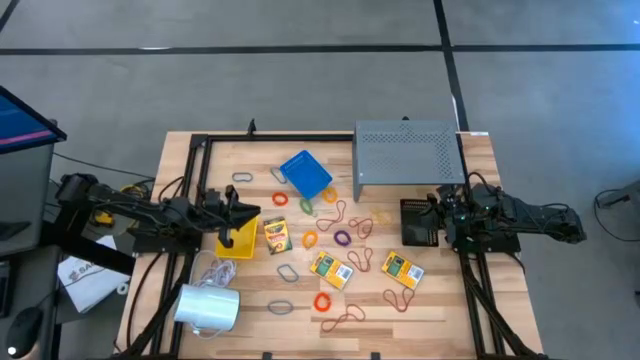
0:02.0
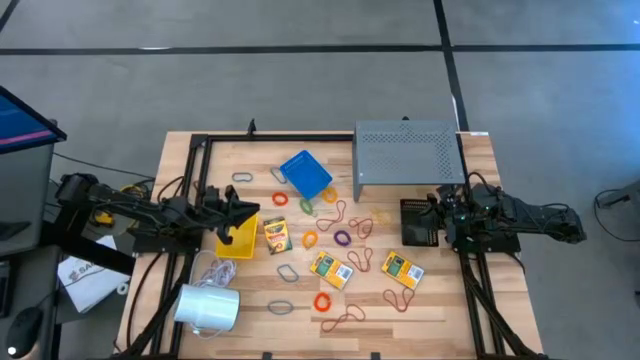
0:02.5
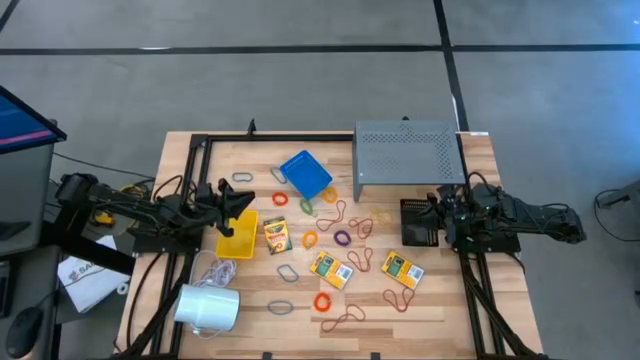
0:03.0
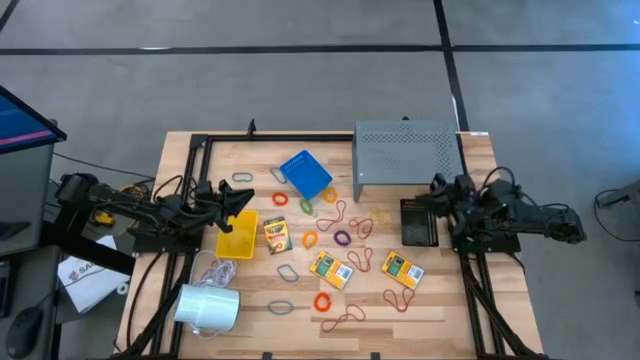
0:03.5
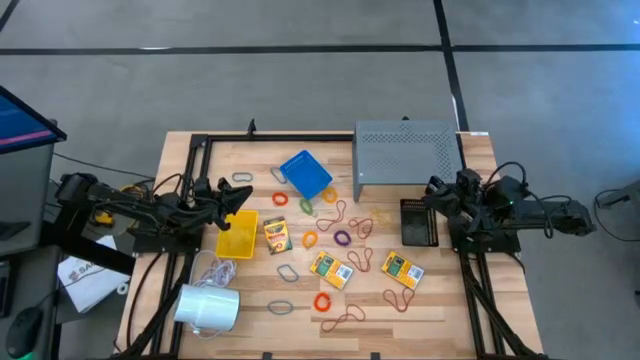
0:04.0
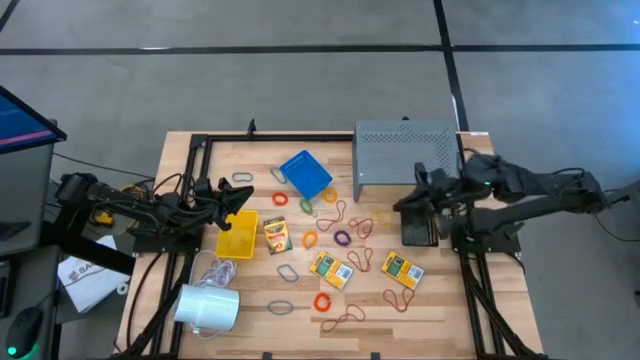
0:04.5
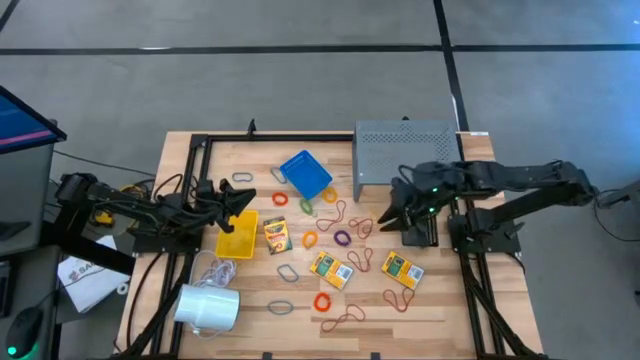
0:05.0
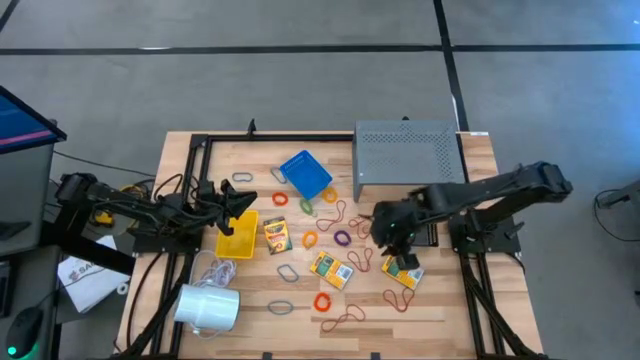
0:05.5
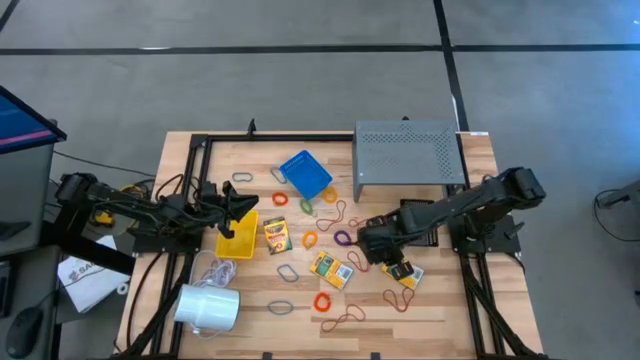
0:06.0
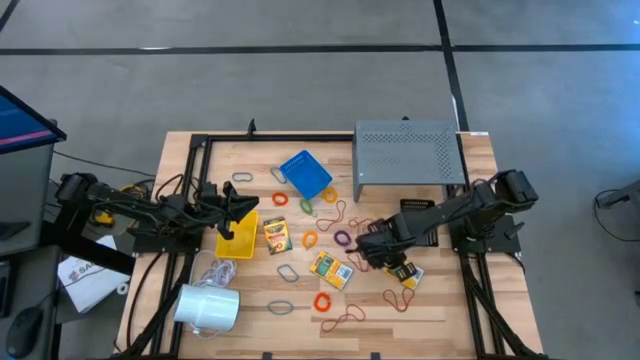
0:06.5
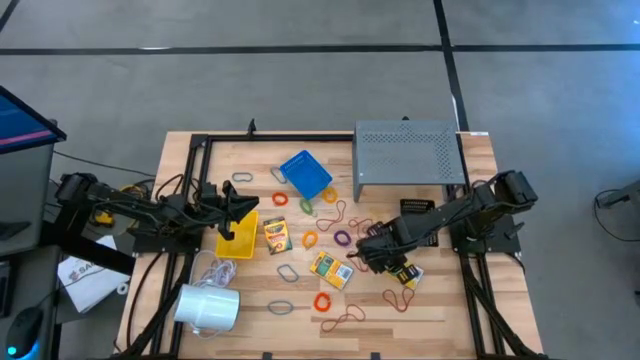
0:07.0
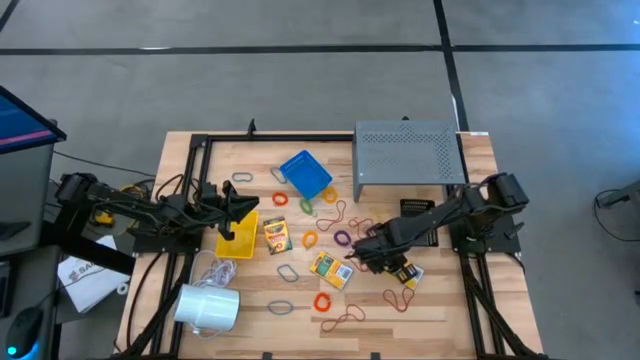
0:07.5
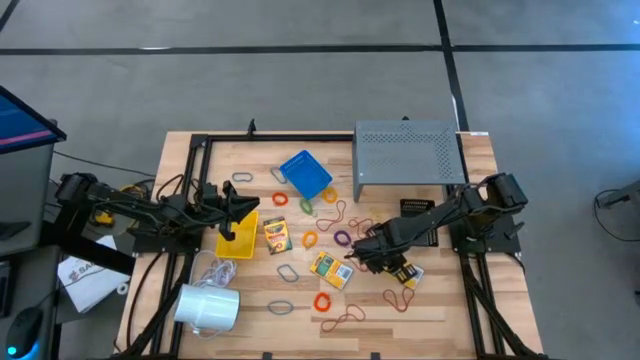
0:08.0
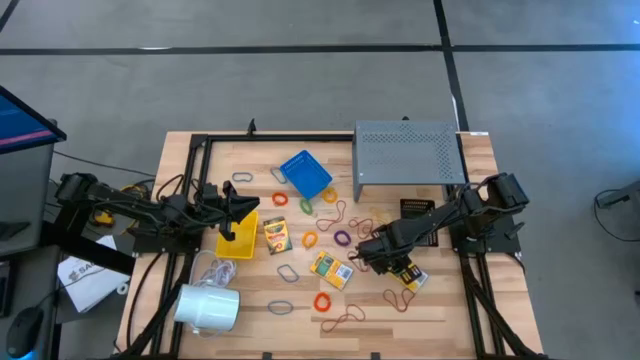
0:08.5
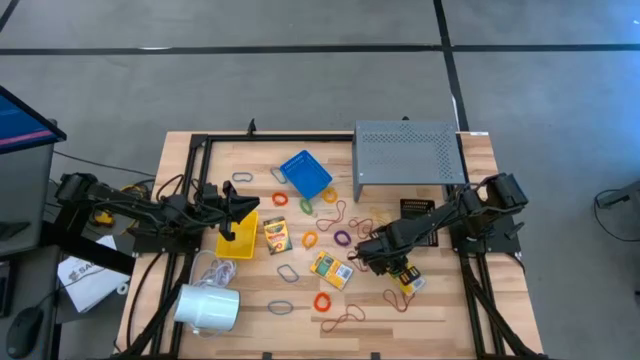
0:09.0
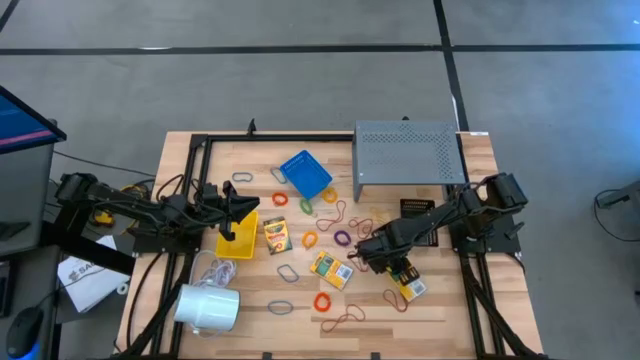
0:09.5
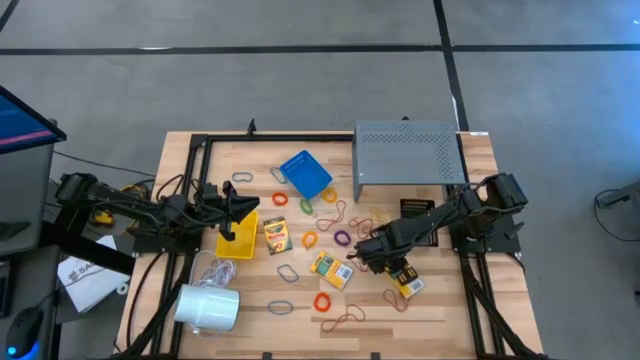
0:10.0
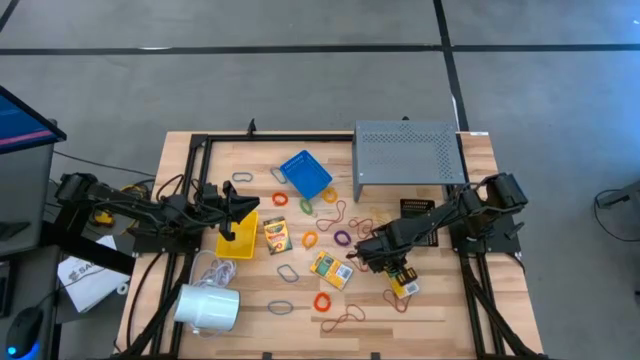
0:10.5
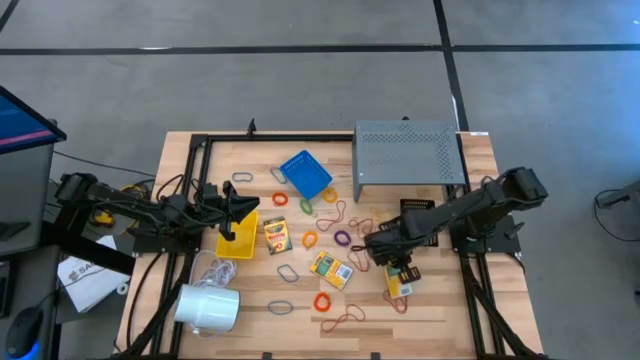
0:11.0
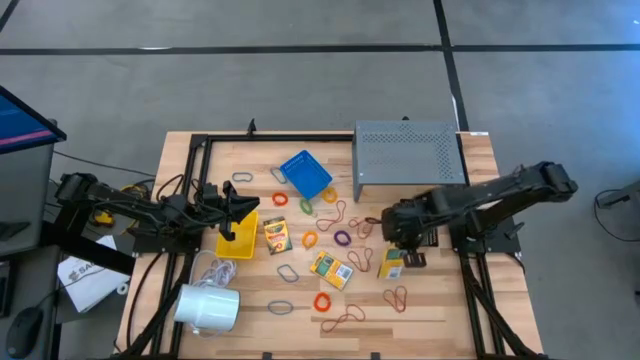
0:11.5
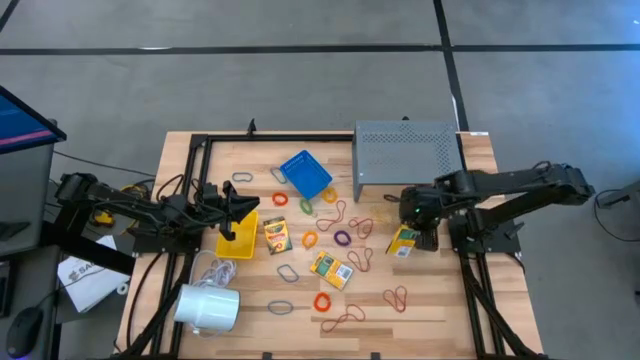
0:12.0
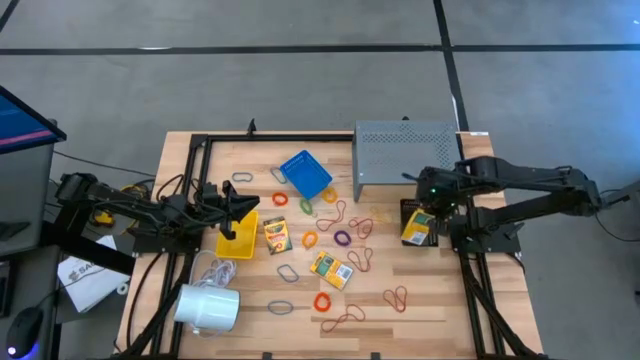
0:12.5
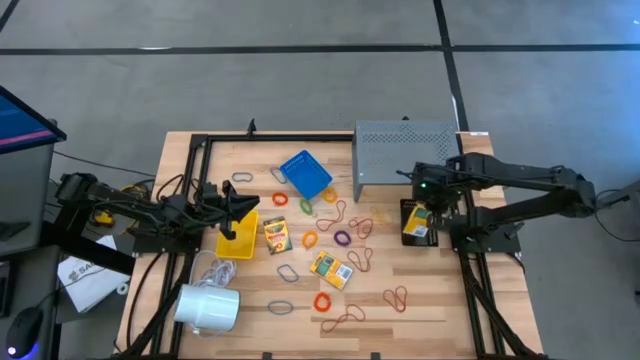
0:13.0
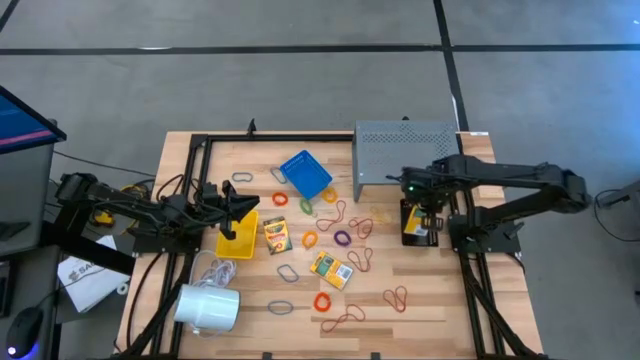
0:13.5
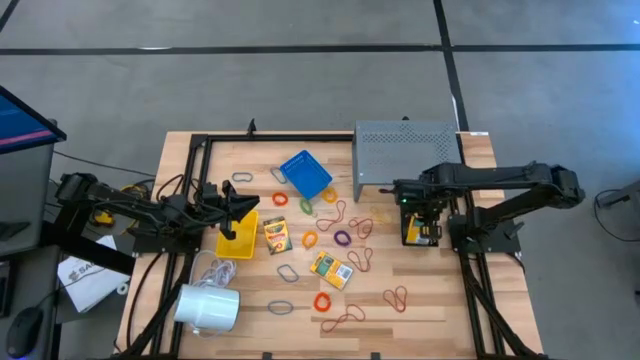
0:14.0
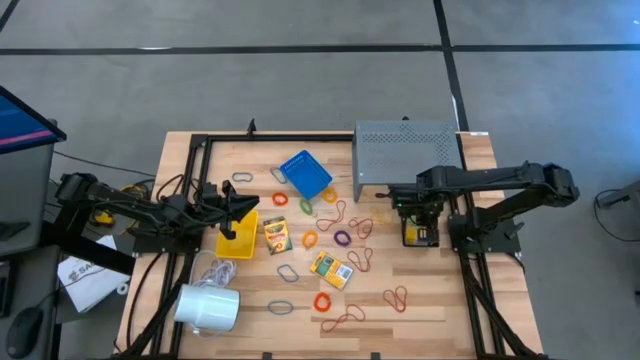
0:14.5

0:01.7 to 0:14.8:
Task: Pick & Place Office Desk Supplies
Put the right yellow crayon box into the black bin

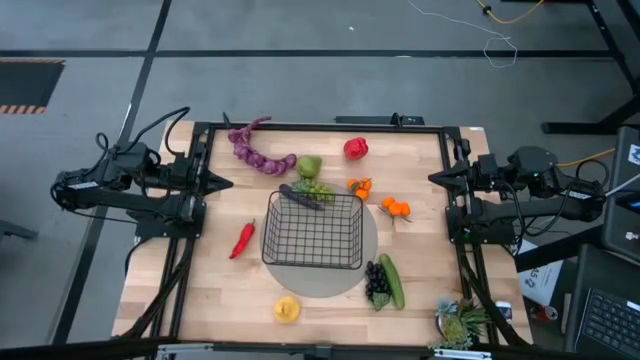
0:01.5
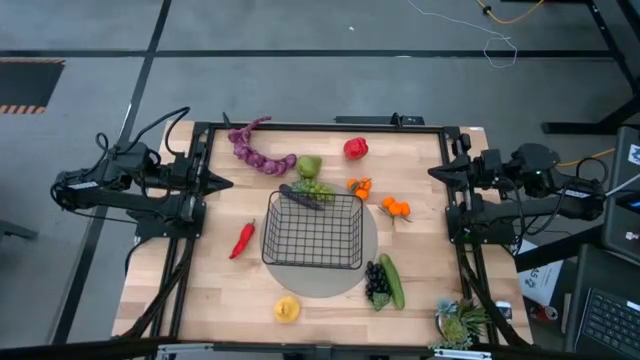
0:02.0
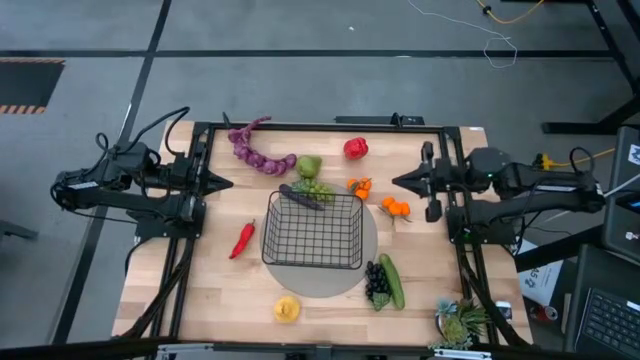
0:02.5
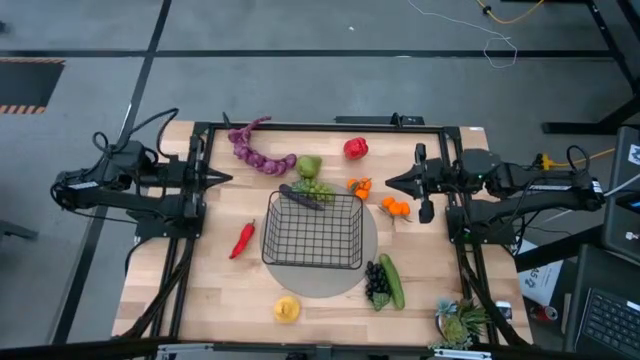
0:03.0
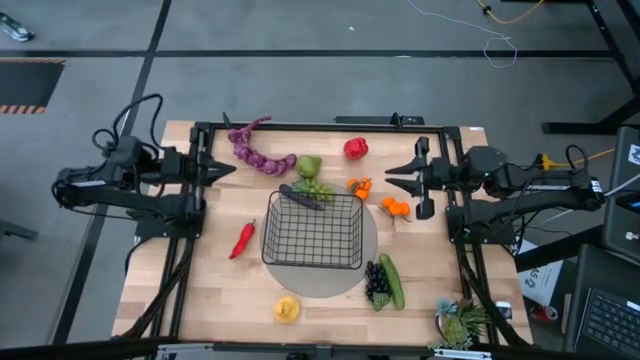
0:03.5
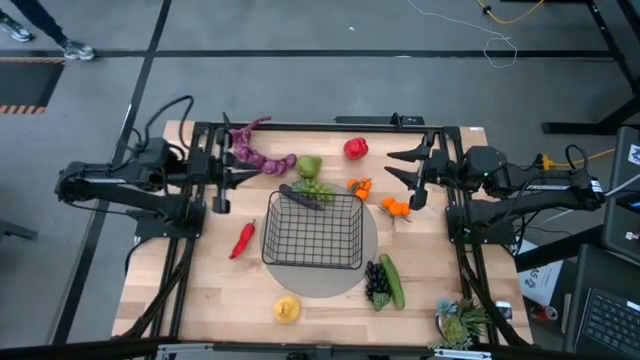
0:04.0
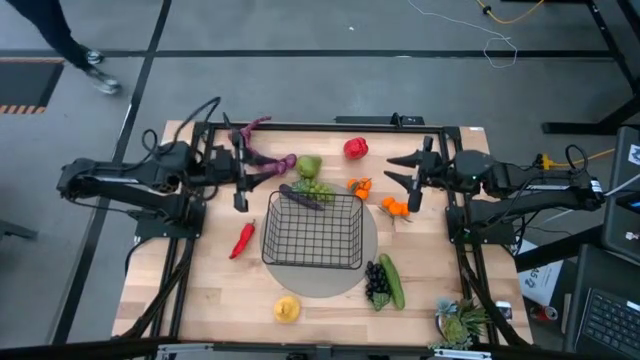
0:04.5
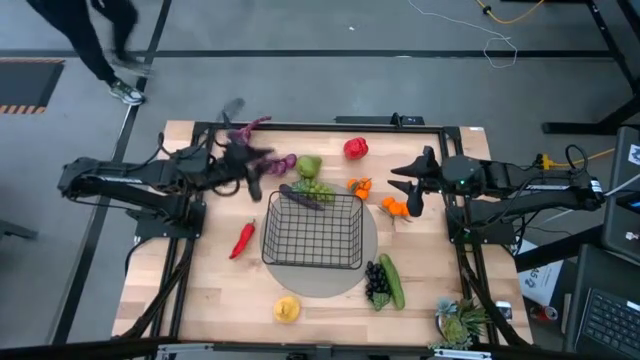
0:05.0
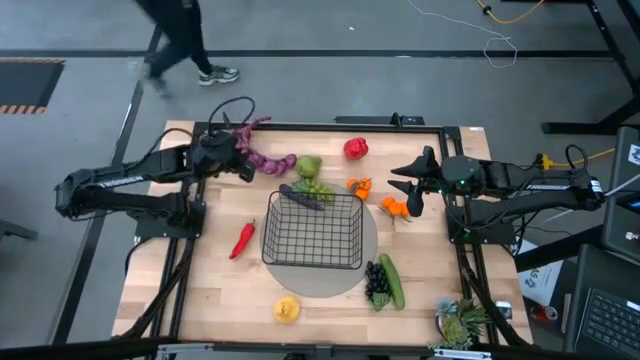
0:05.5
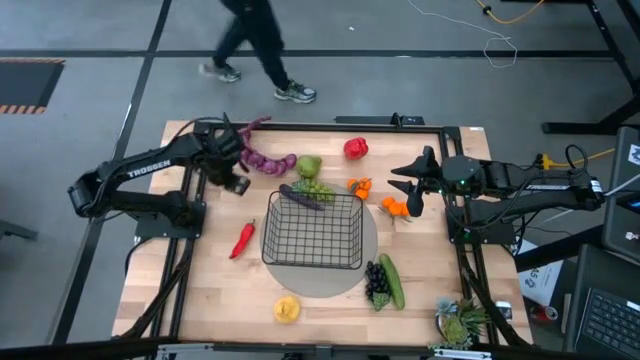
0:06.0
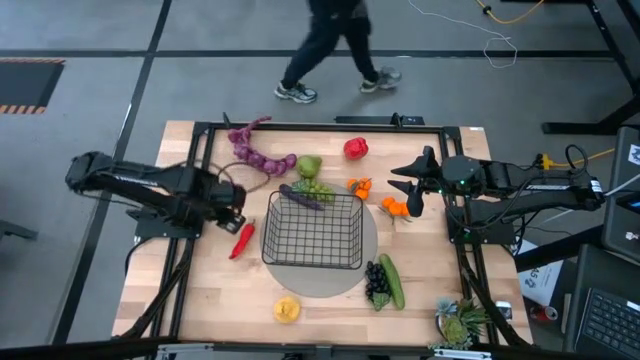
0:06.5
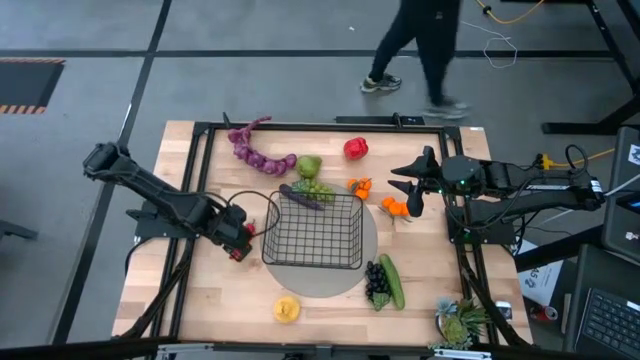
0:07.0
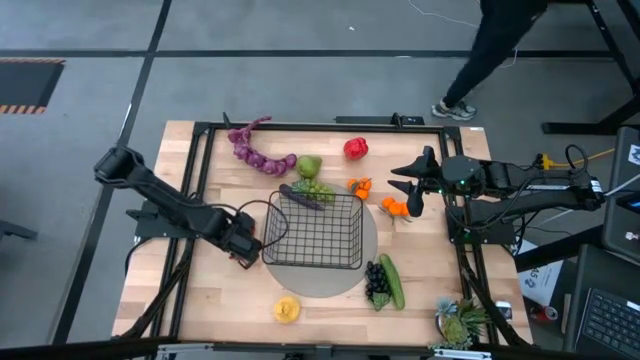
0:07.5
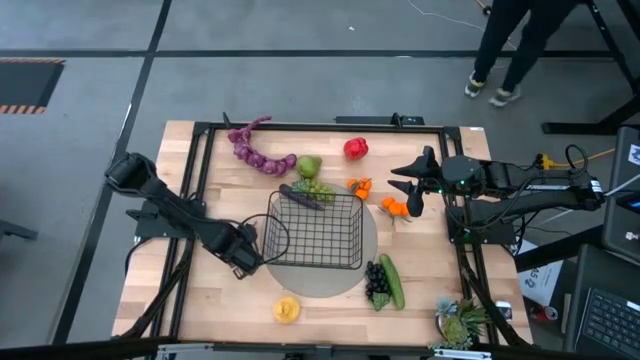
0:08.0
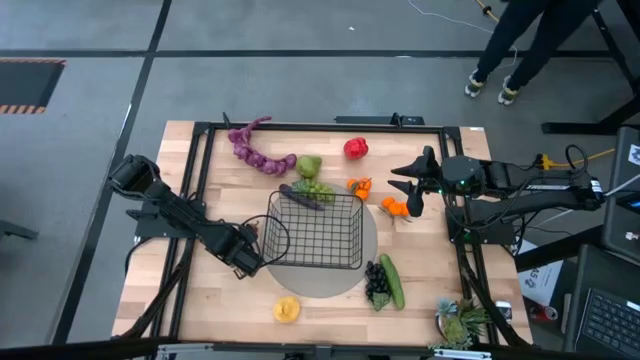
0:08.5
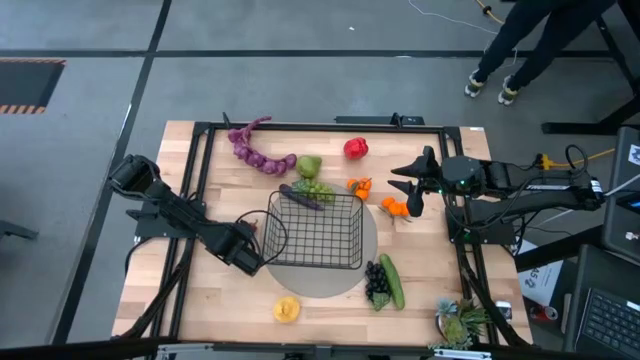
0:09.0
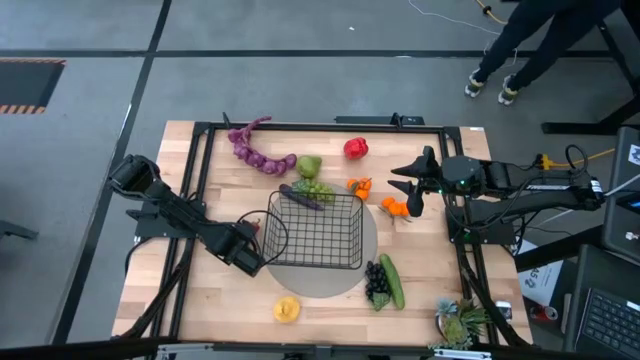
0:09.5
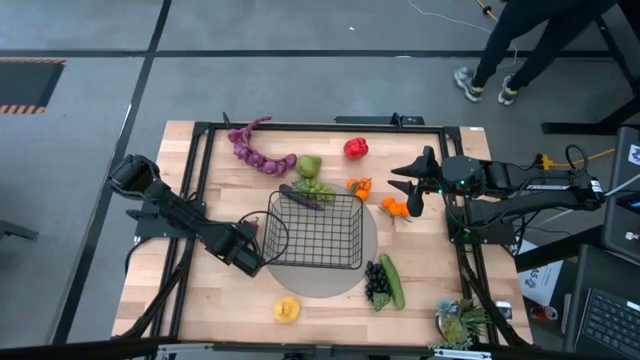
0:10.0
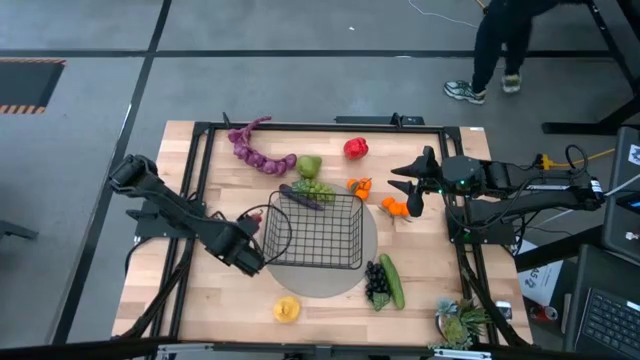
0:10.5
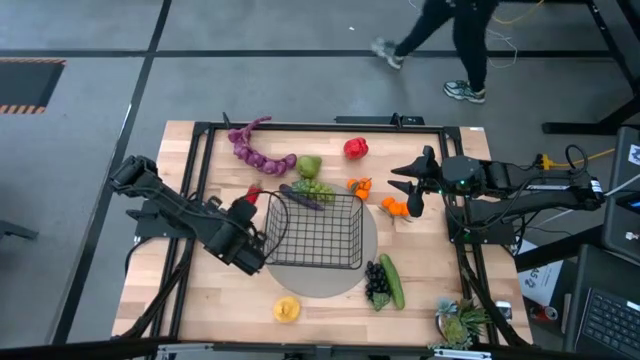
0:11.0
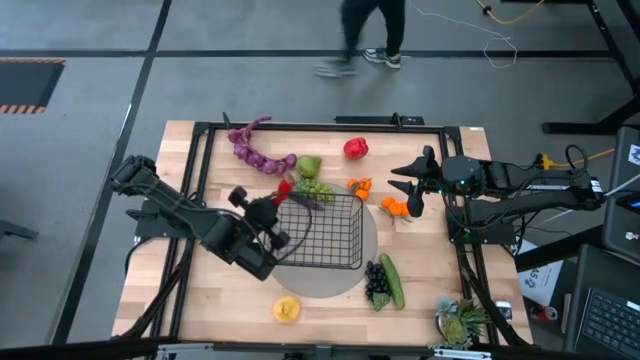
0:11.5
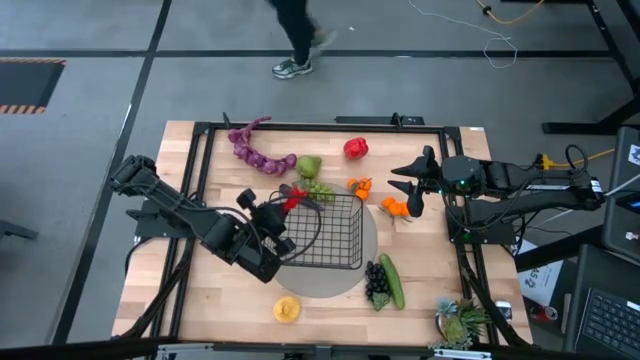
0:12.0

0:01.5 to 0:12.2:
Task: Build produce basket
Put the red chili pepper into the black wire basket
